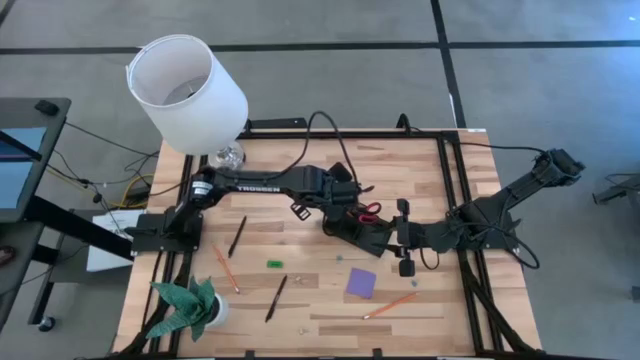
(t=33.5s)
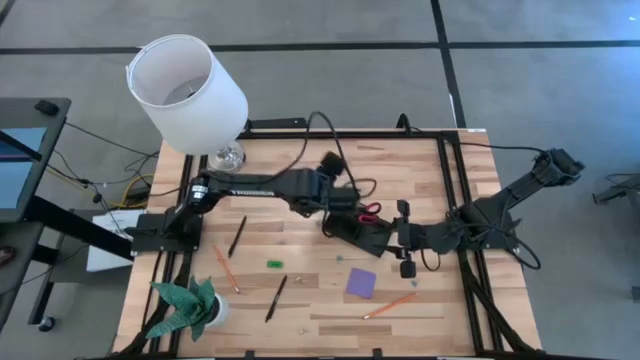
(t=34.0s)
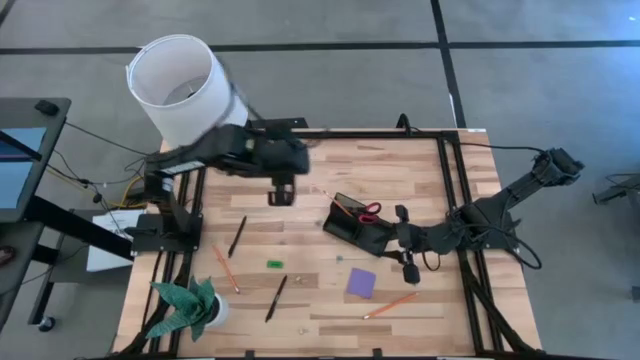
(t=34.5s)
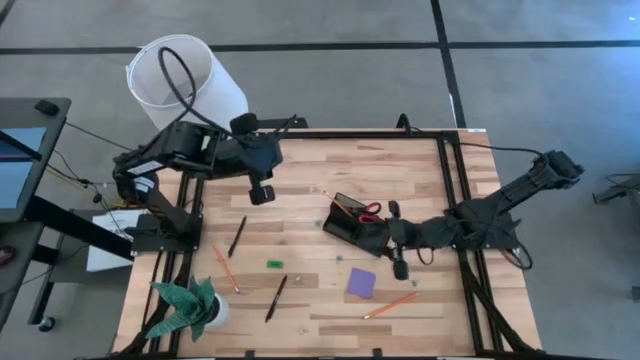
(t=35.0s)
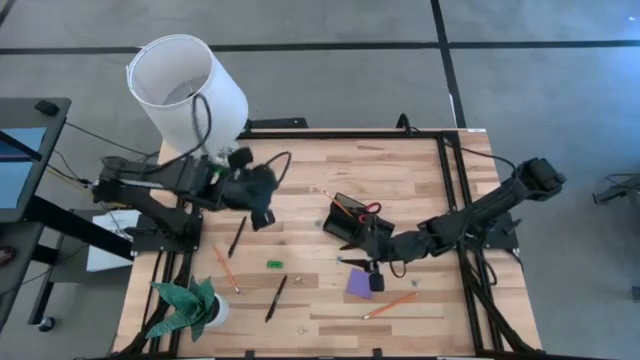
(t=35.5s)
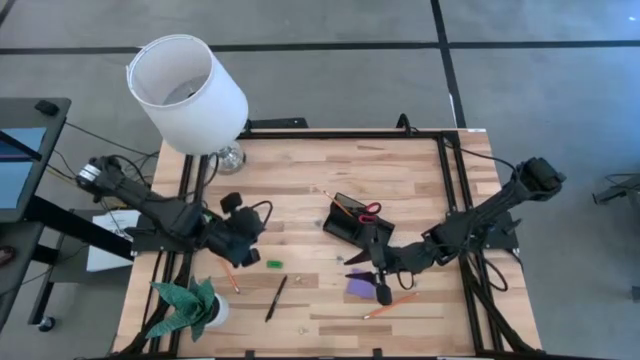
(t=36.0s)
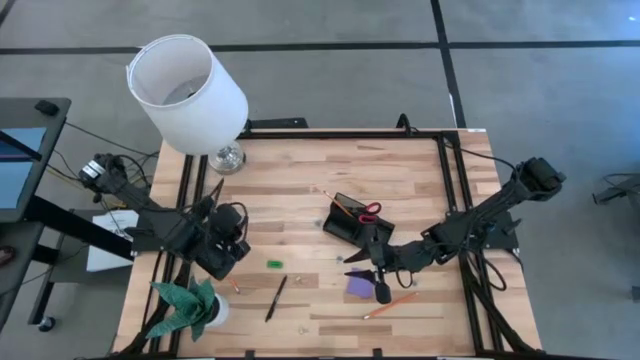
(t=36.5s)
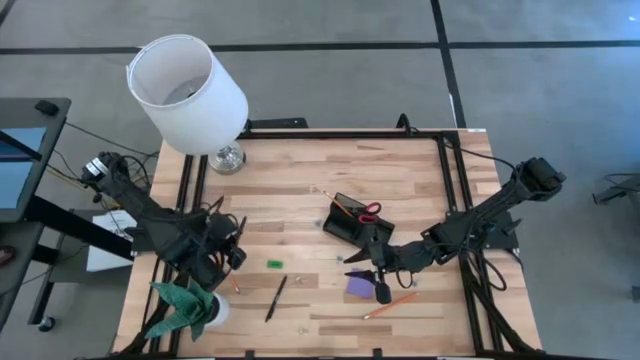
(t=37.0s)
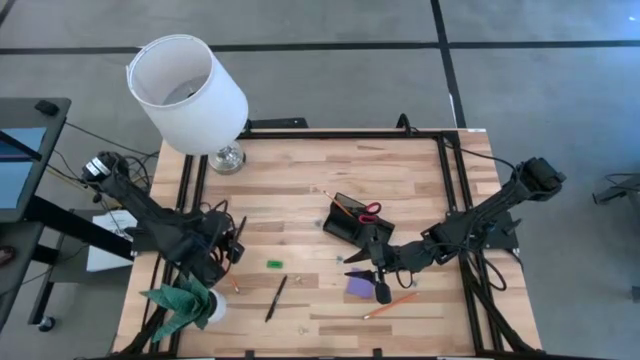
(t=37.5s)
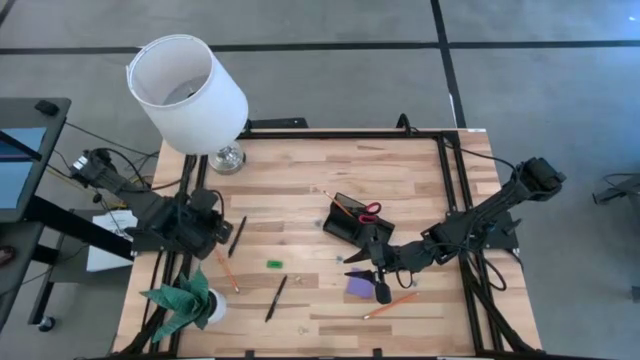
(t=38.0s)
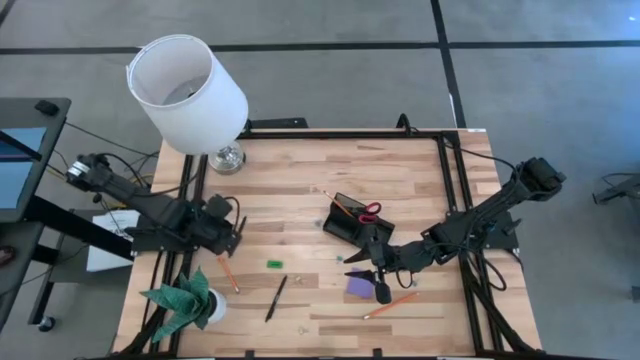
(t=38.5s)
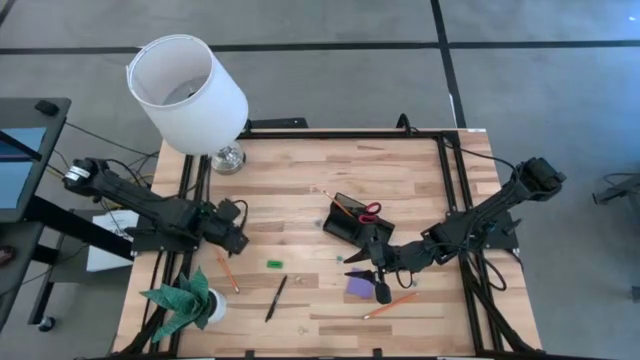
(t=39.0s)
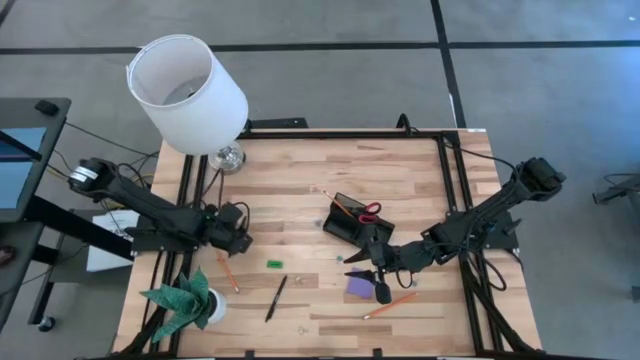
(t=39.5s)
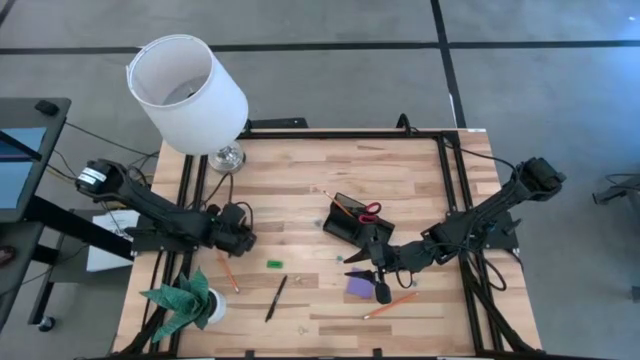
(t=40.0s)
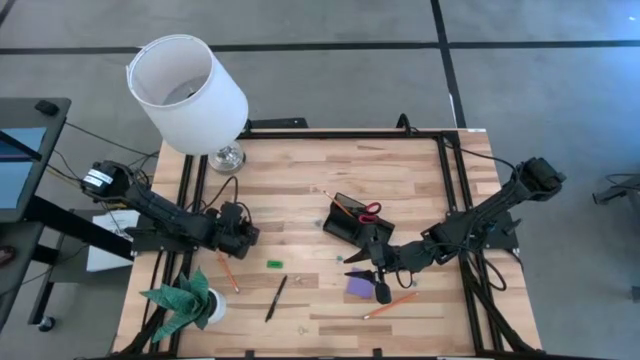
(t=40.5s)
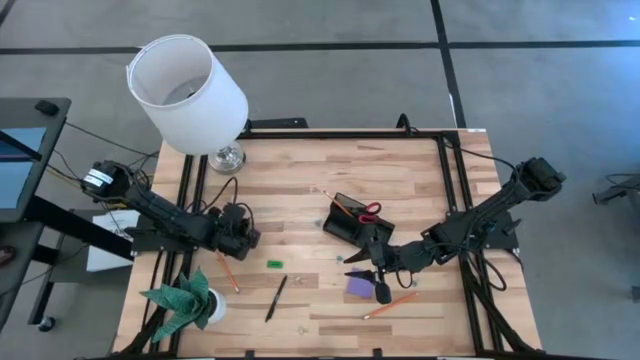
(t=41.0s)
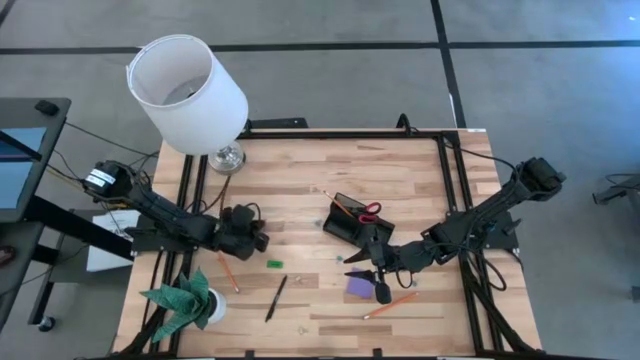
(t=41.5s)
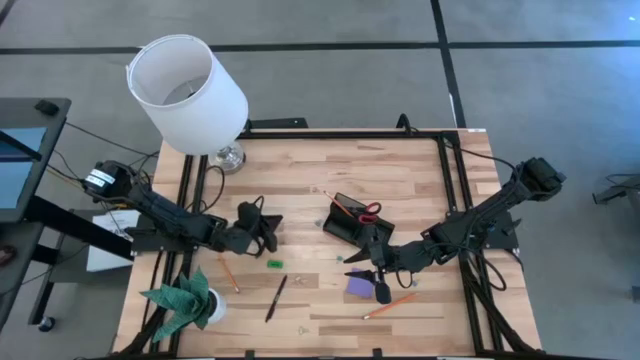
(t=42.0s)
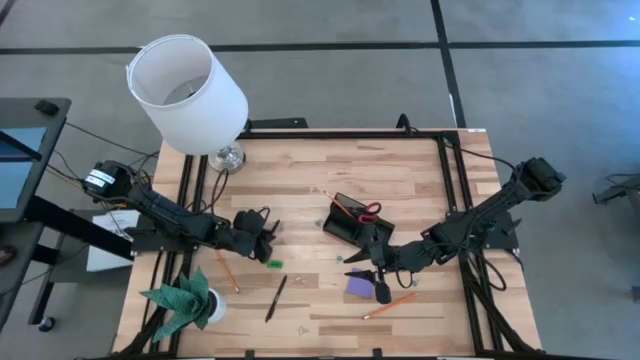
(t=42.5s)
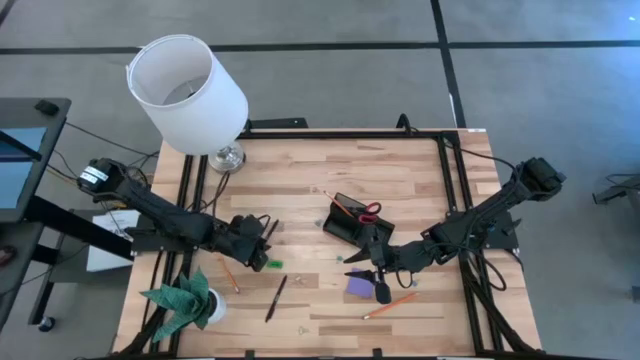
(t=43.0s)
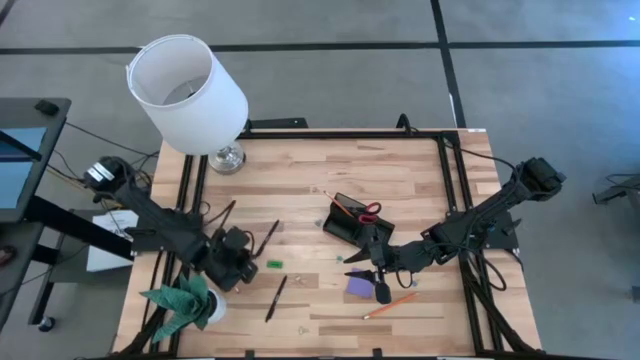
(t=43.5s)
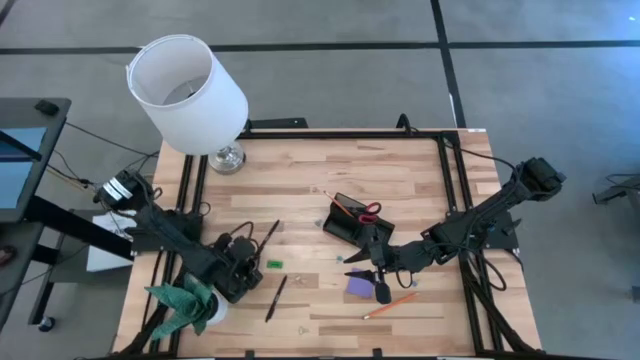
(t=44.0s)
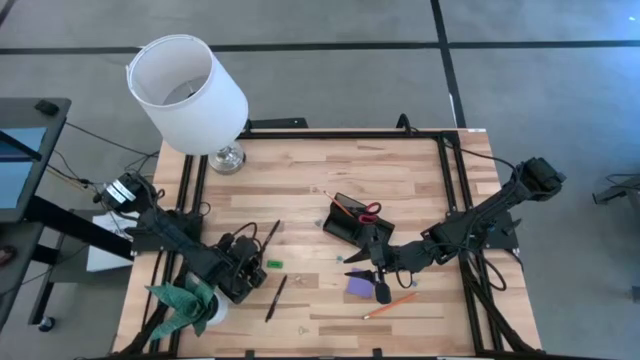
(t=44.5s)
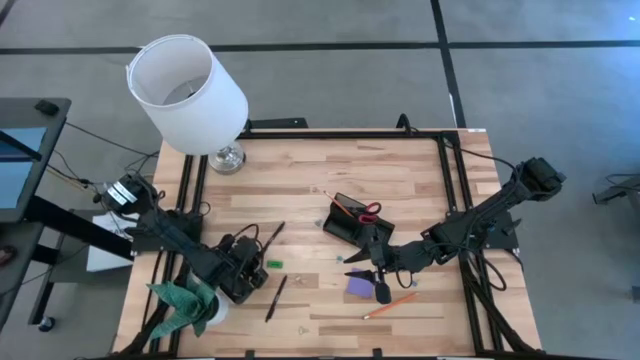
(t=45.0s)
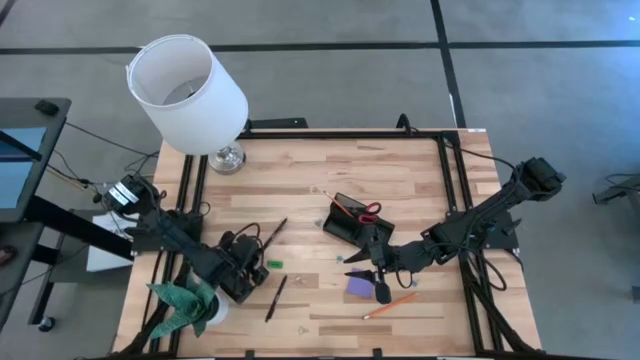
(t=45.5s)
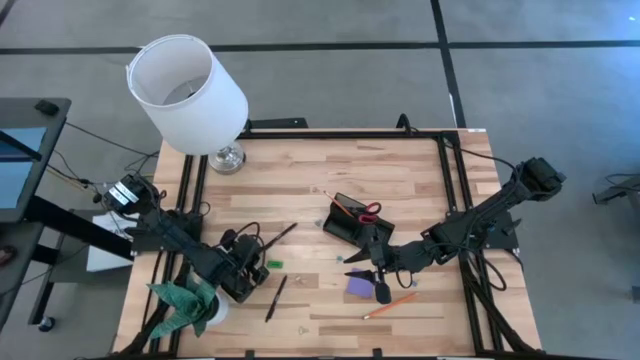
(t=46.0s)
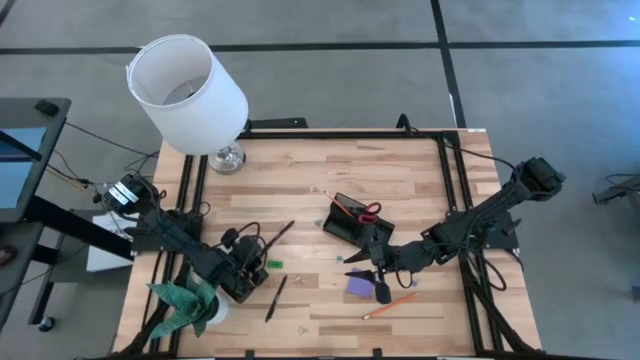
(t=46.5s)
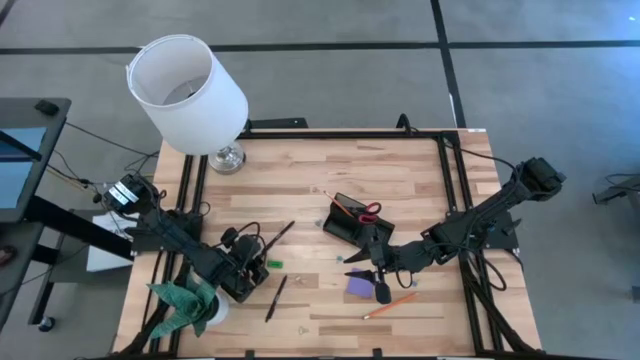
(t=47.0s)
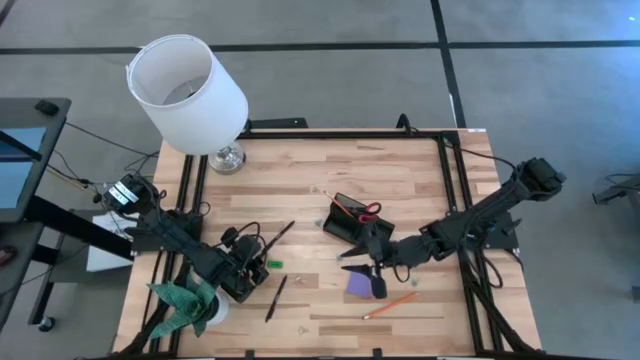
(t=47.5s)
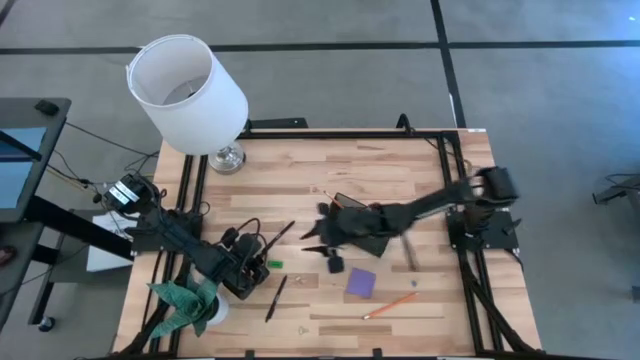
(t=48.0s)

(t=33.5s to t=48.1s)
Task: Pick and place office supplies into organizer
Put the top black pen into the black desk organizer

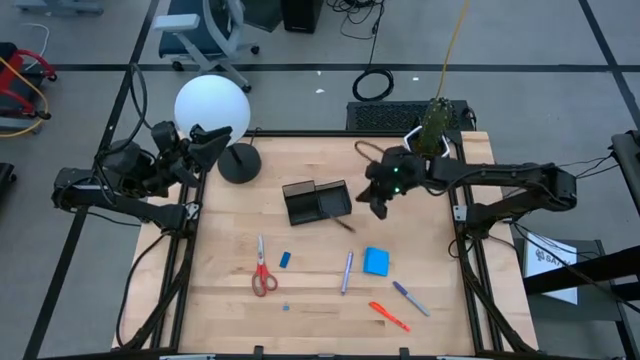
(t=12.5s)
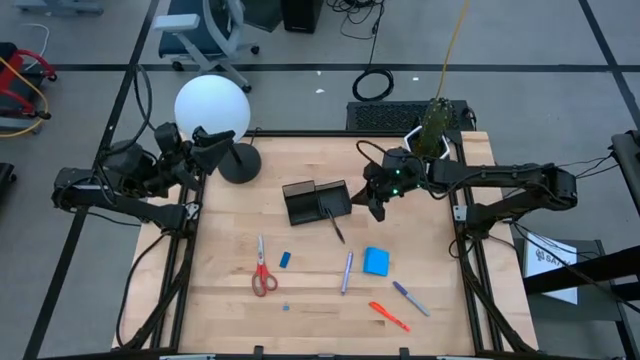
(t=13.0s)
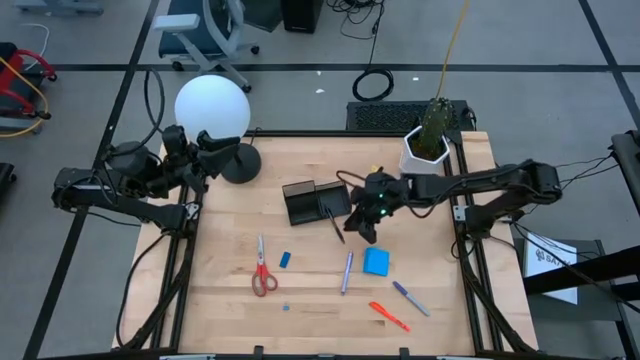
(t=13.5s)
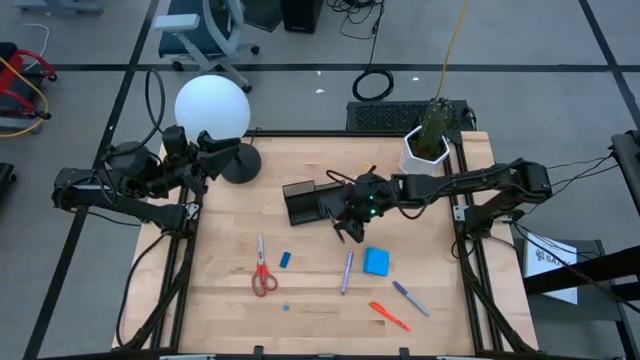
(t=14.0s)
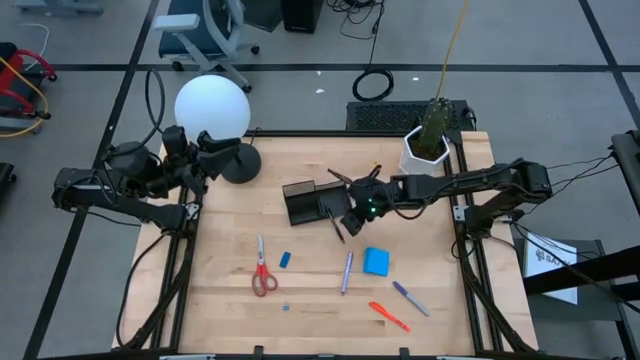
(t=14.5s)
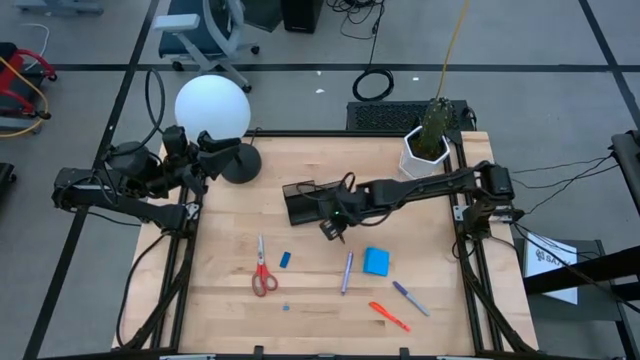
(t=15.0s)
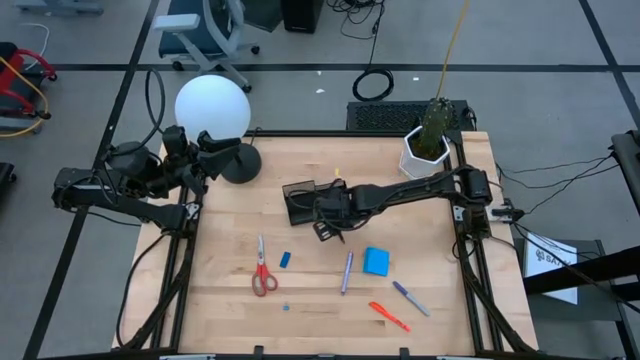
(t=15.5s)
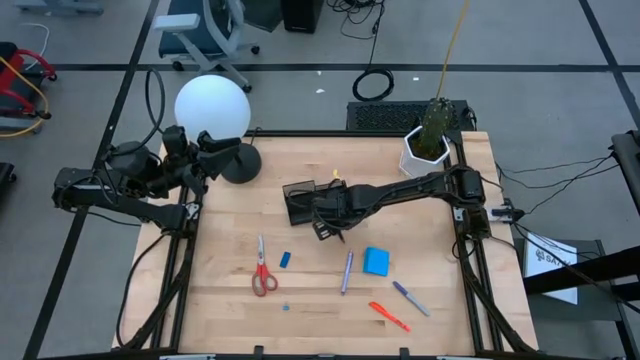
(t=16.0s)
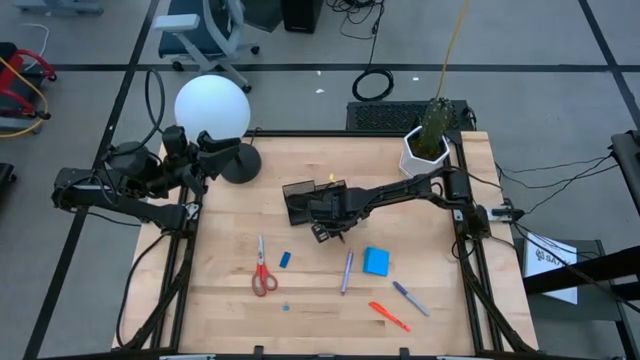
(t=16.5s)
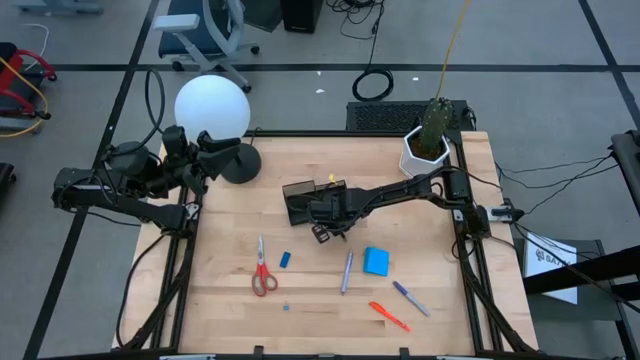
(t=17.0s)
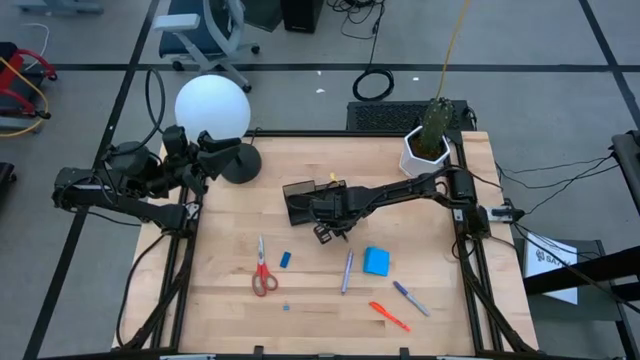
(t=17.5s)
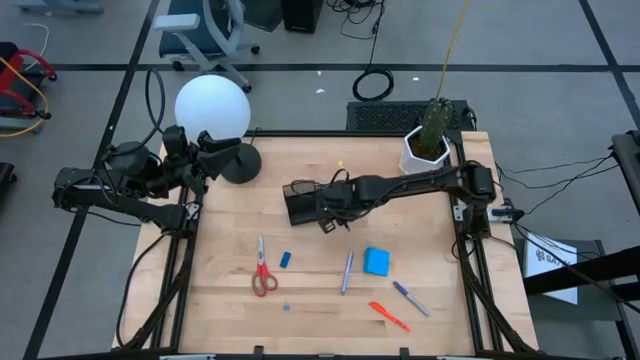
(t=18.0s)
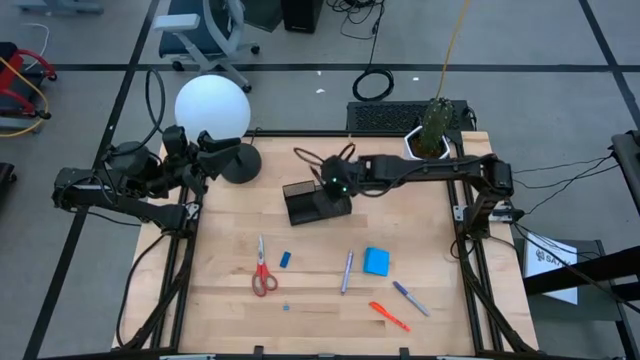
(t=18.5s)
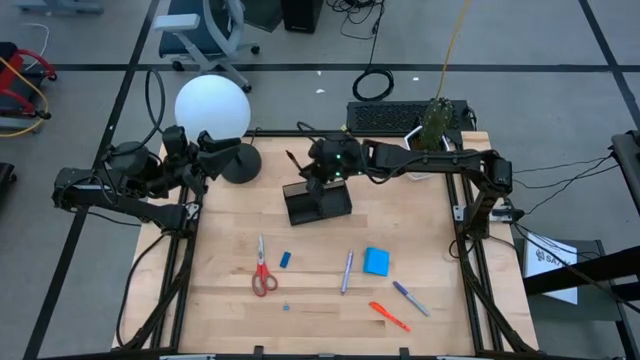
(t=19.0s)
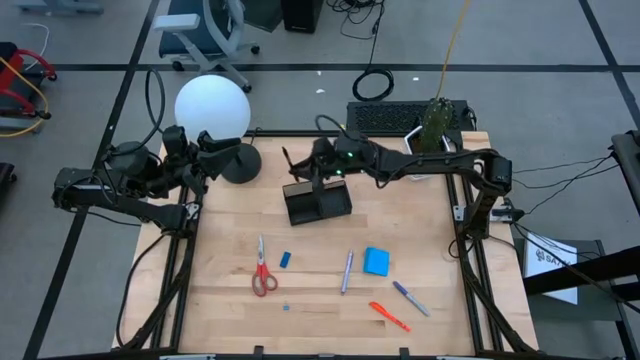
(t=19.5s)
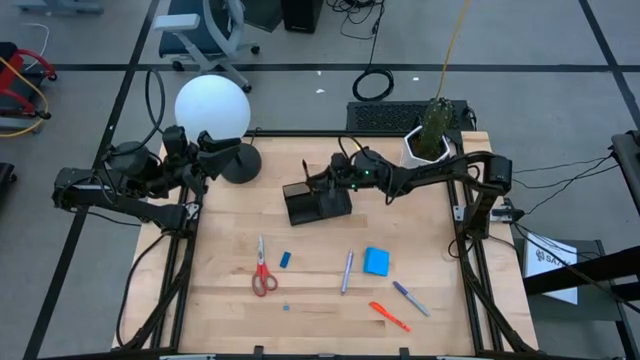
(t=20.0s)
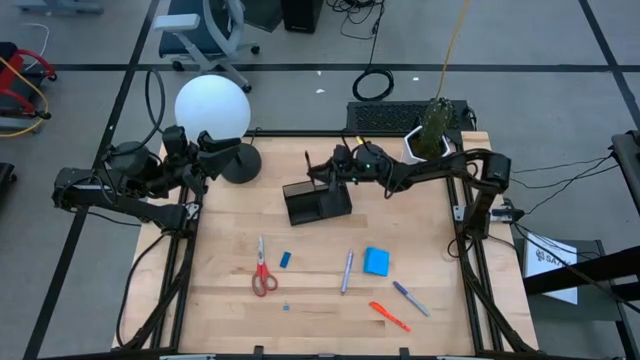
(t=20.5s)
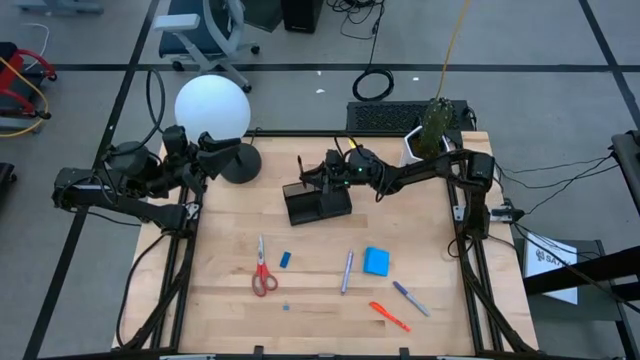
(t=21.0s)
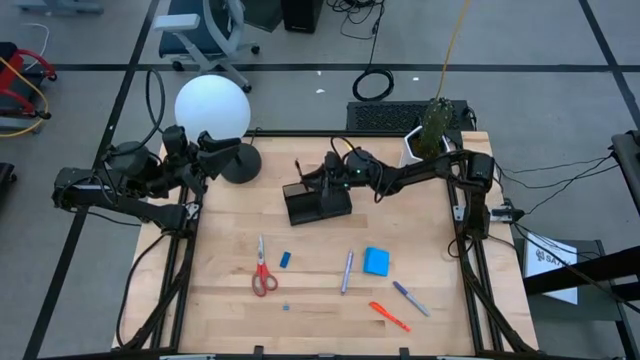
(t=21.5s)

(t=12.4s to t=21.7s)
Task: Pick and place office supplies into organizer
Put the top black pen into the black desk organizer
